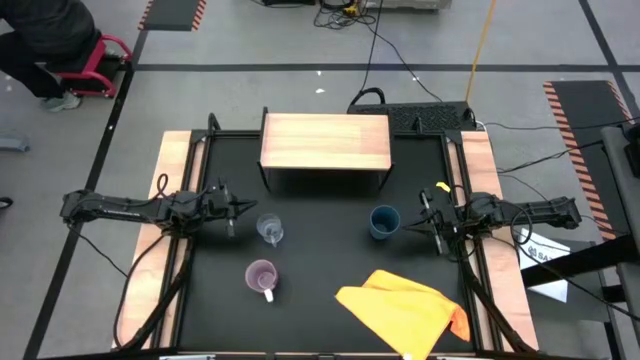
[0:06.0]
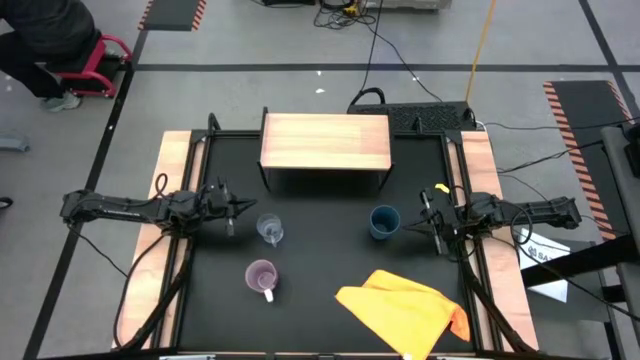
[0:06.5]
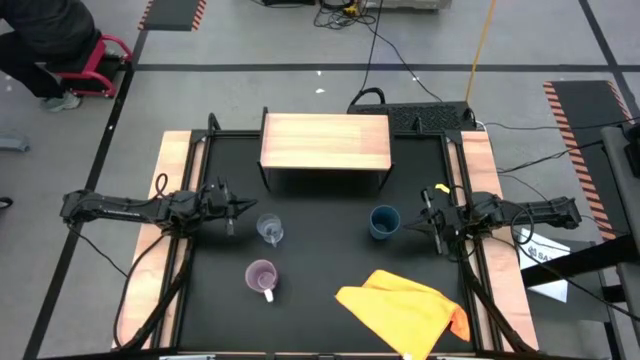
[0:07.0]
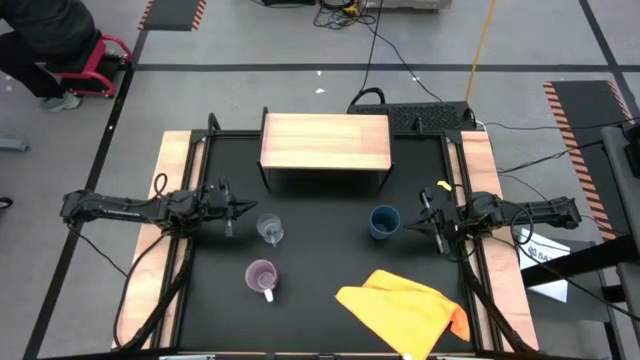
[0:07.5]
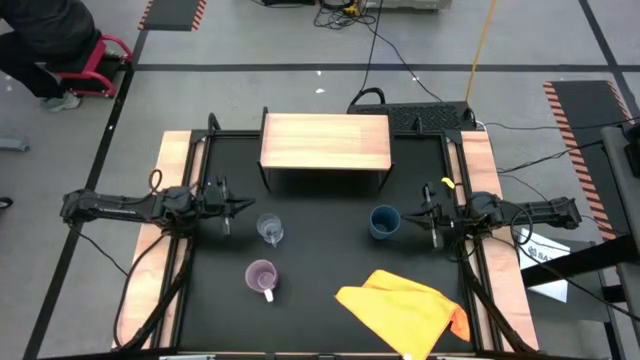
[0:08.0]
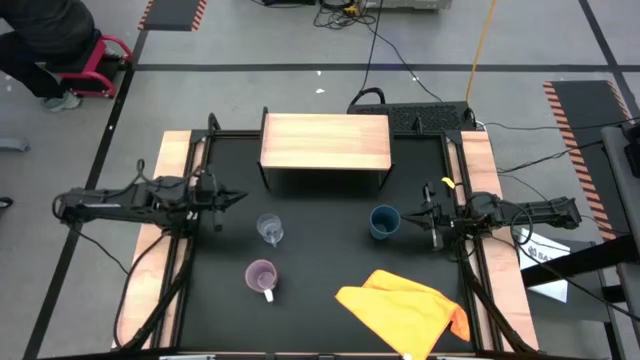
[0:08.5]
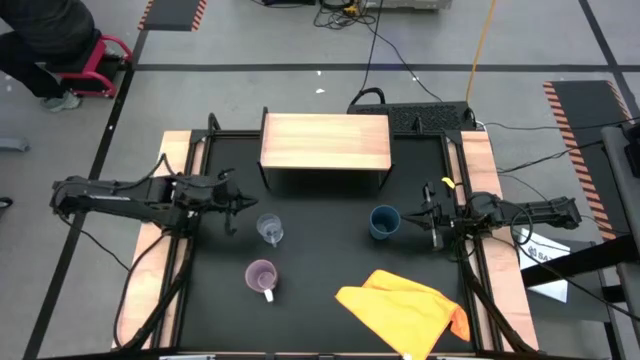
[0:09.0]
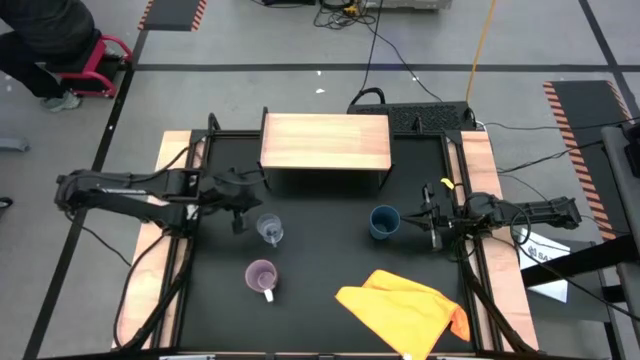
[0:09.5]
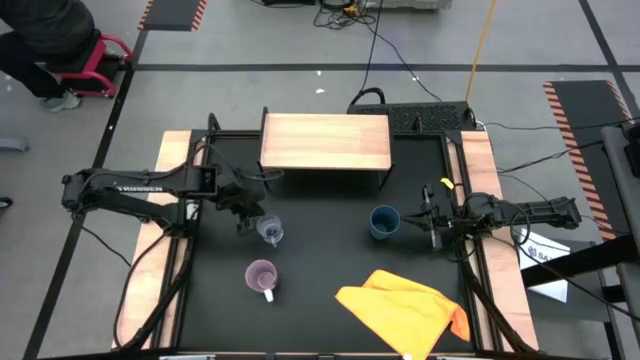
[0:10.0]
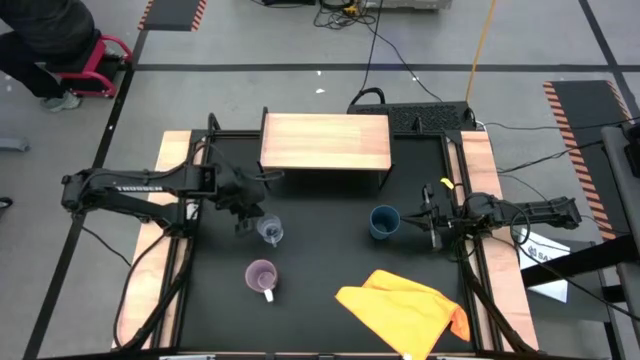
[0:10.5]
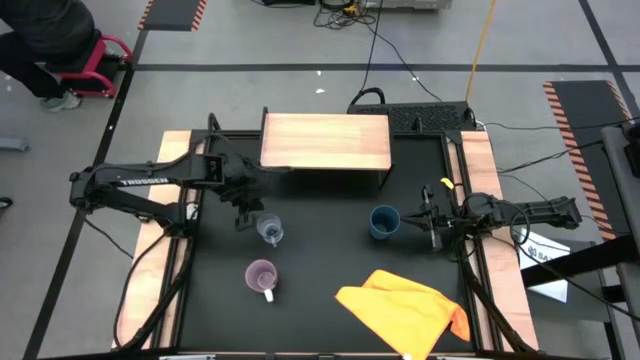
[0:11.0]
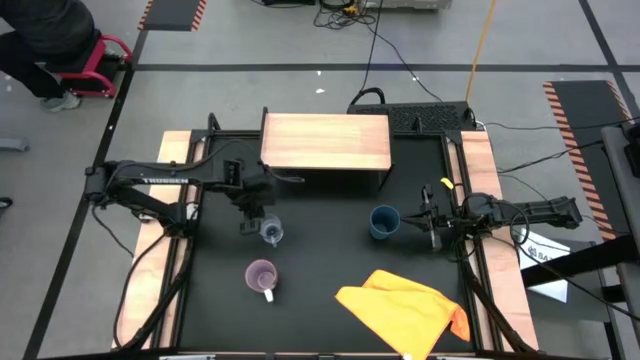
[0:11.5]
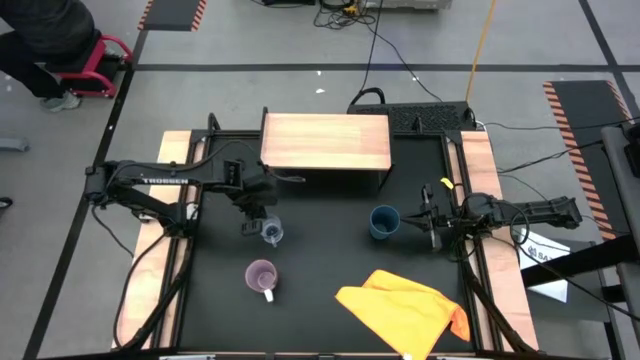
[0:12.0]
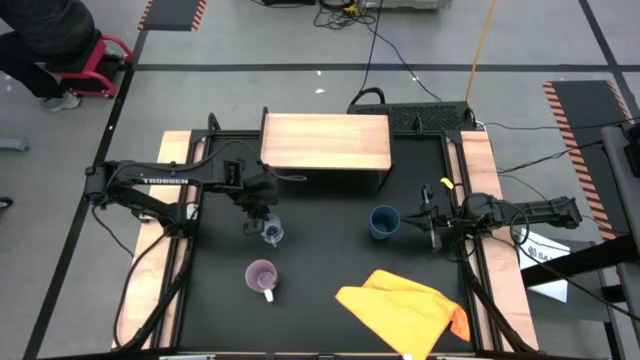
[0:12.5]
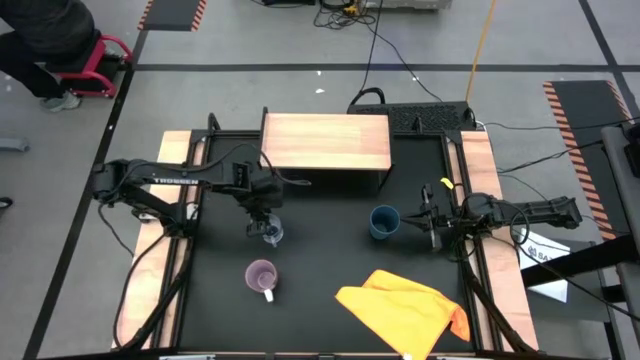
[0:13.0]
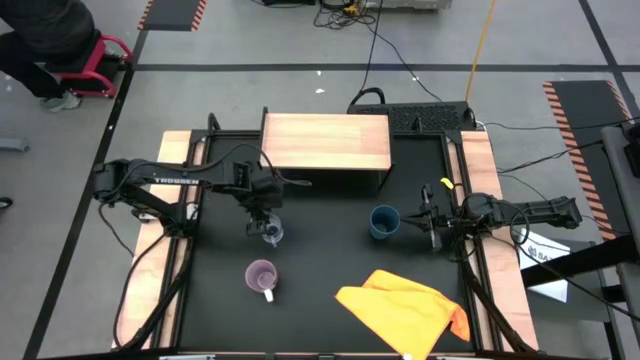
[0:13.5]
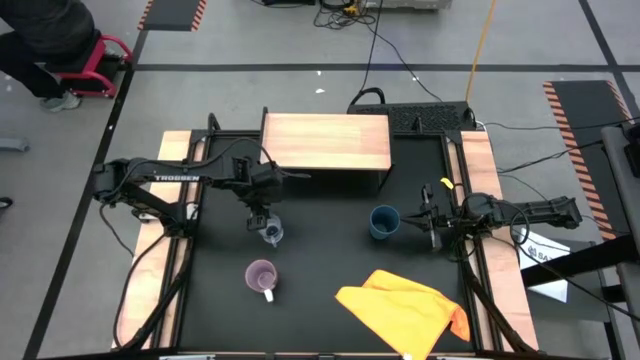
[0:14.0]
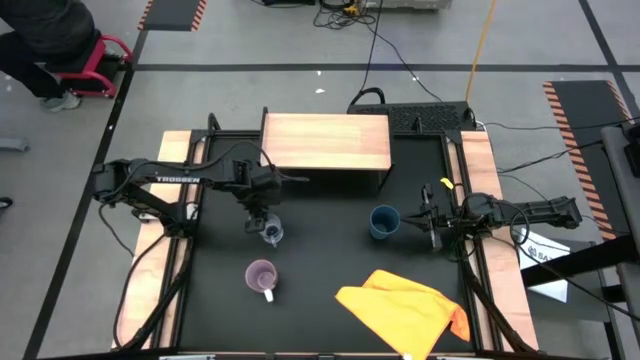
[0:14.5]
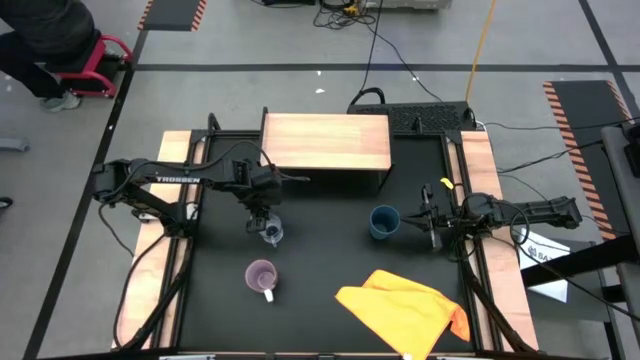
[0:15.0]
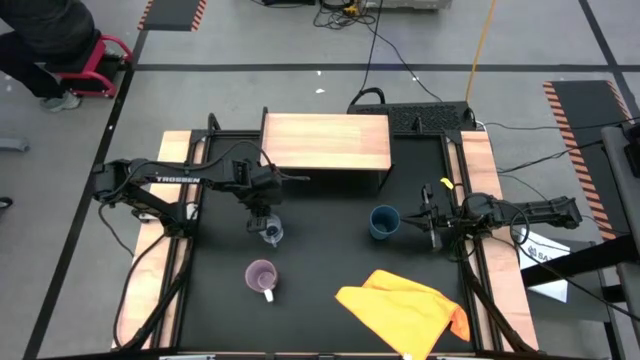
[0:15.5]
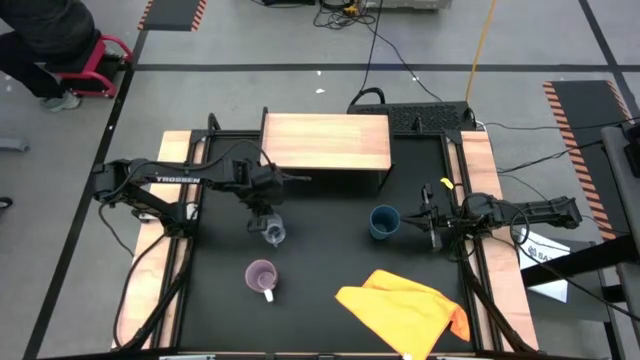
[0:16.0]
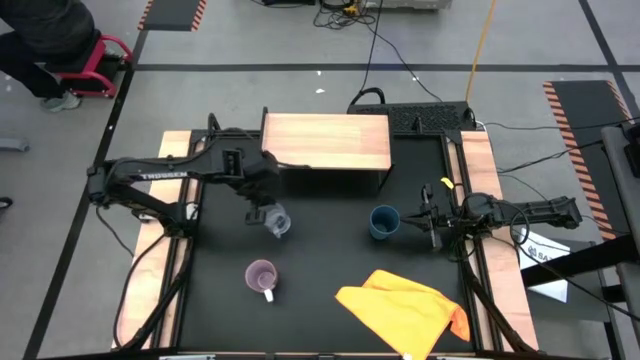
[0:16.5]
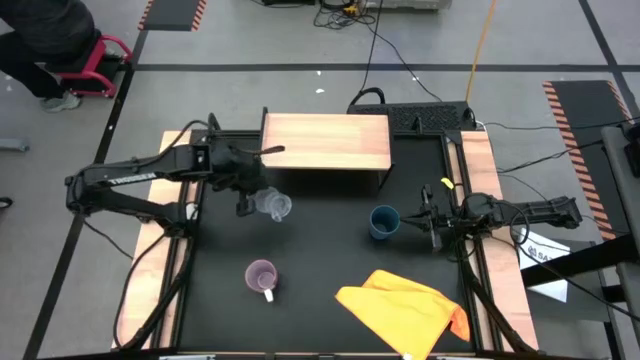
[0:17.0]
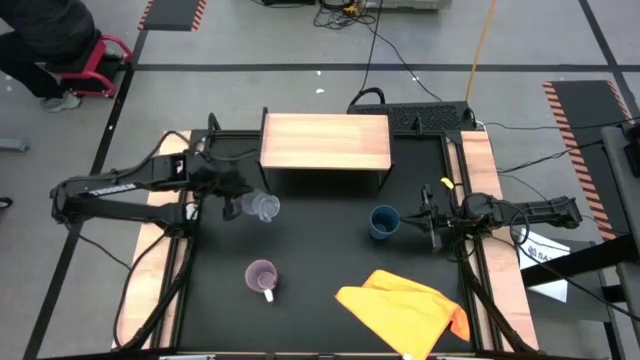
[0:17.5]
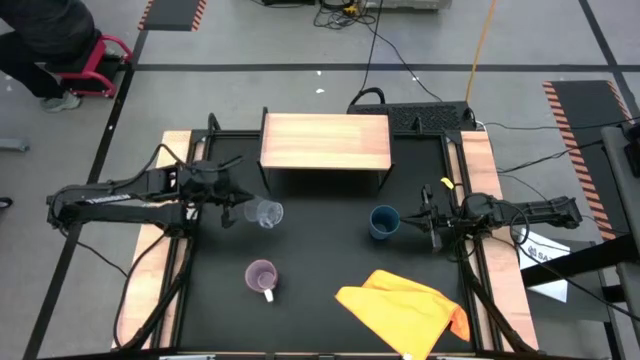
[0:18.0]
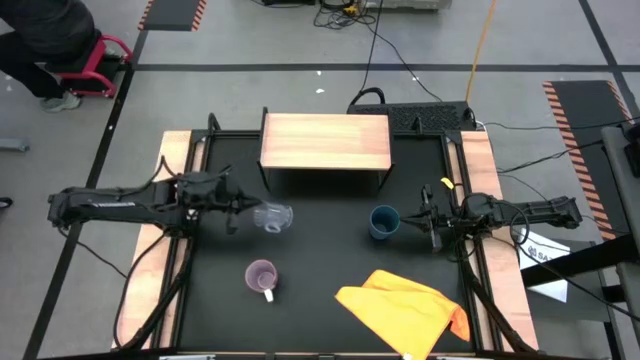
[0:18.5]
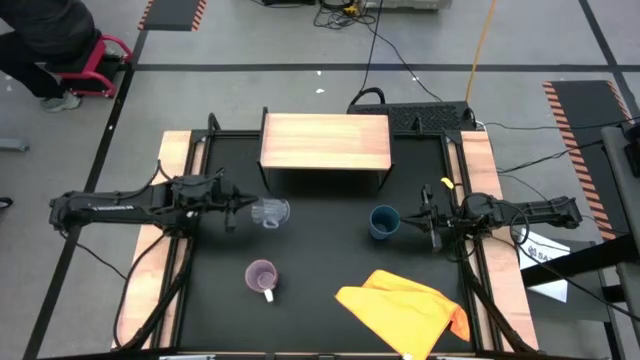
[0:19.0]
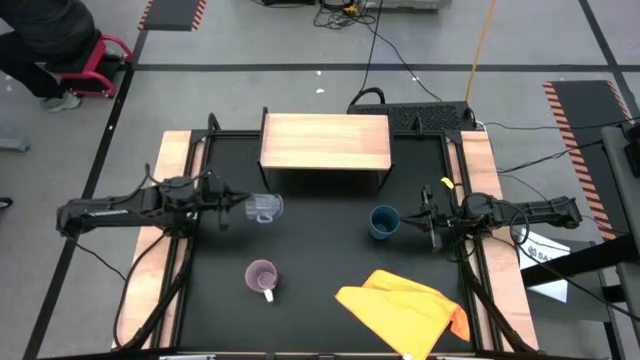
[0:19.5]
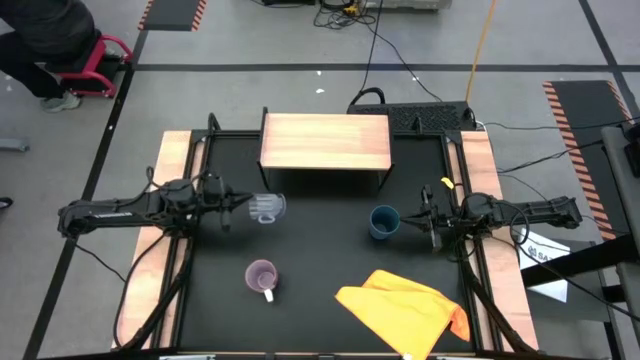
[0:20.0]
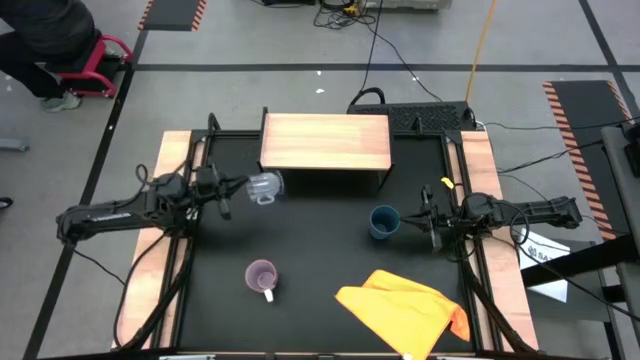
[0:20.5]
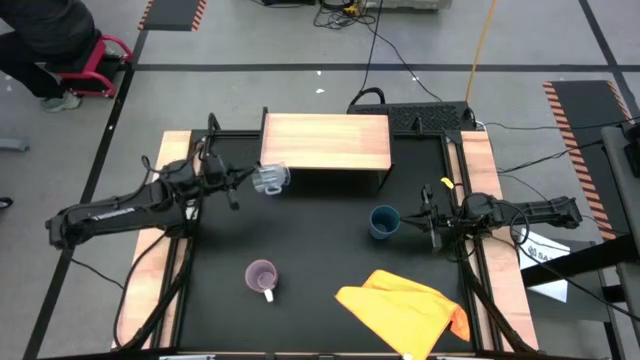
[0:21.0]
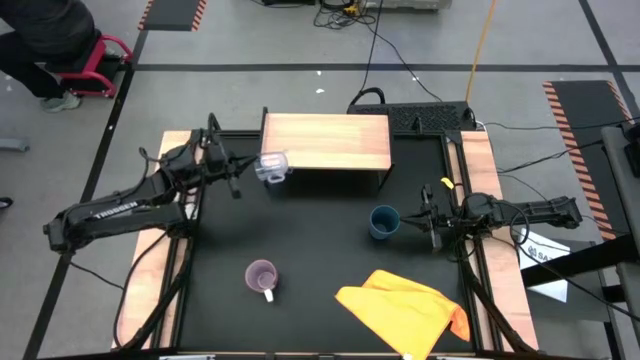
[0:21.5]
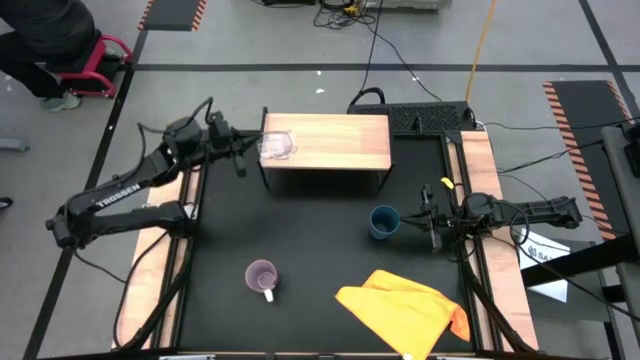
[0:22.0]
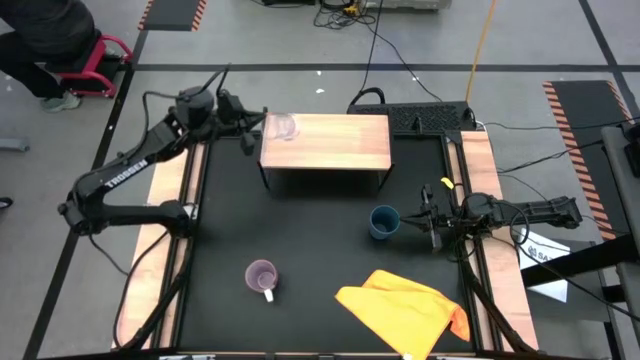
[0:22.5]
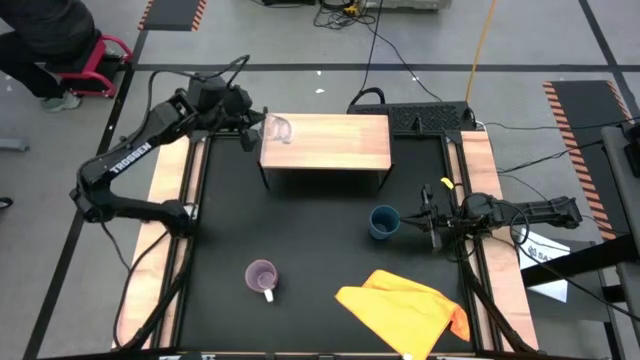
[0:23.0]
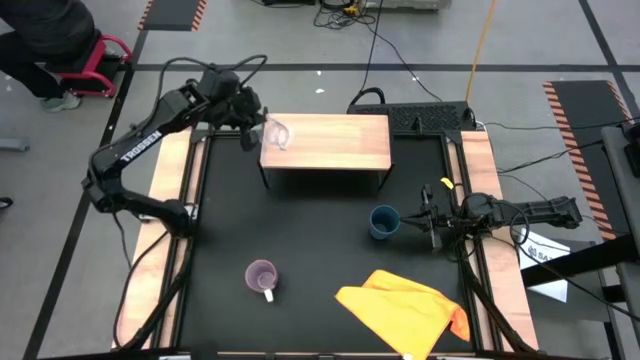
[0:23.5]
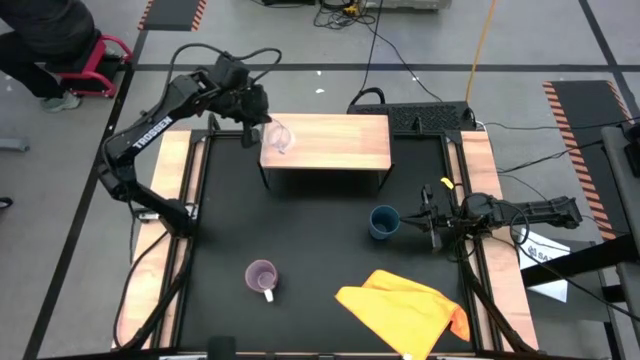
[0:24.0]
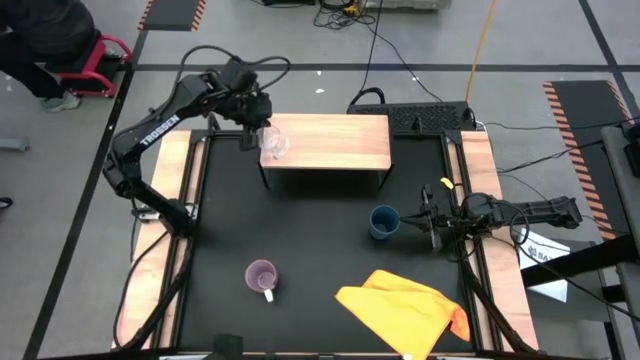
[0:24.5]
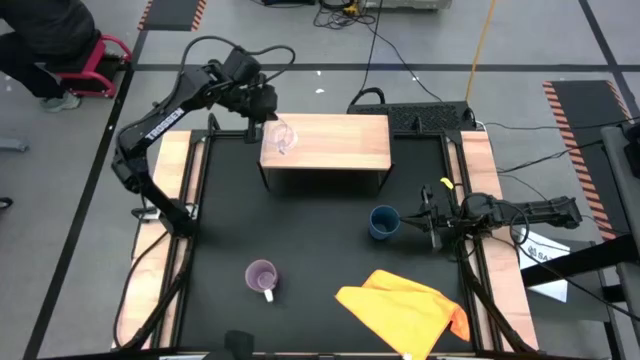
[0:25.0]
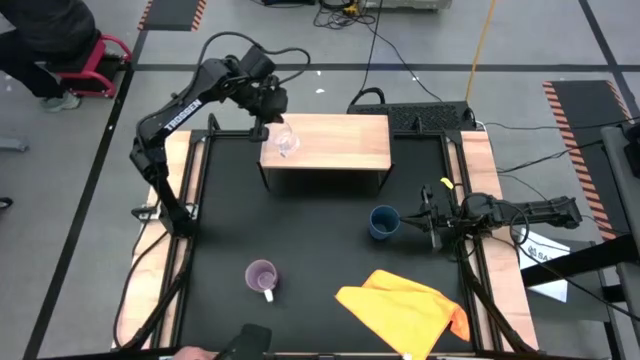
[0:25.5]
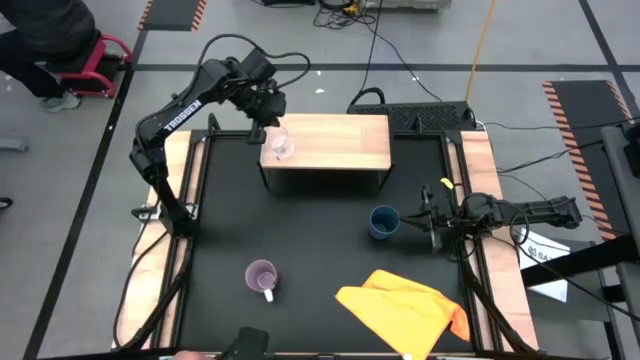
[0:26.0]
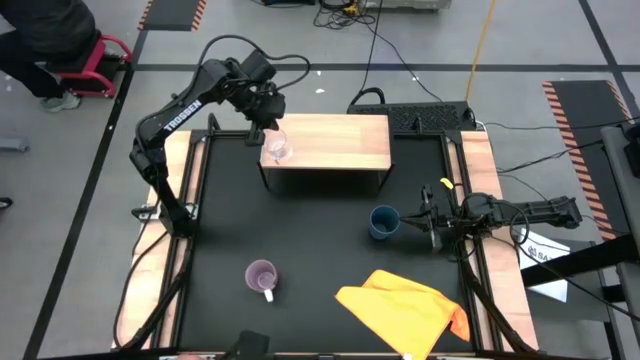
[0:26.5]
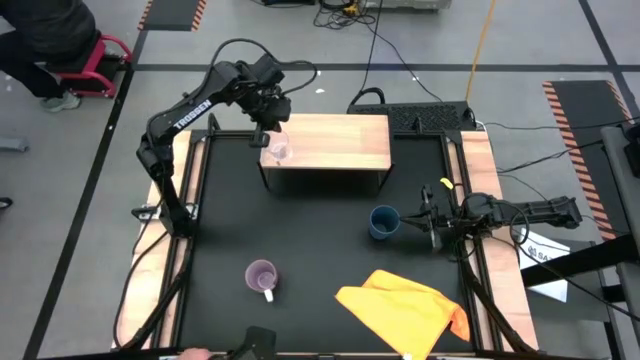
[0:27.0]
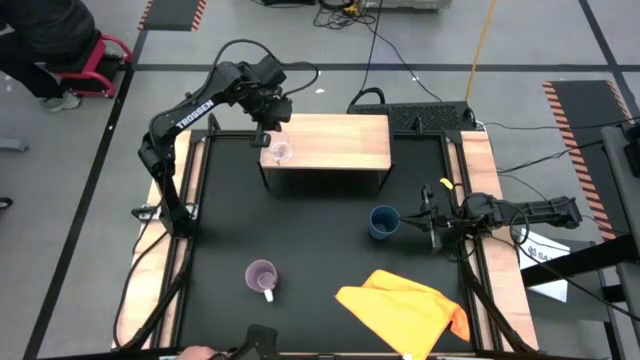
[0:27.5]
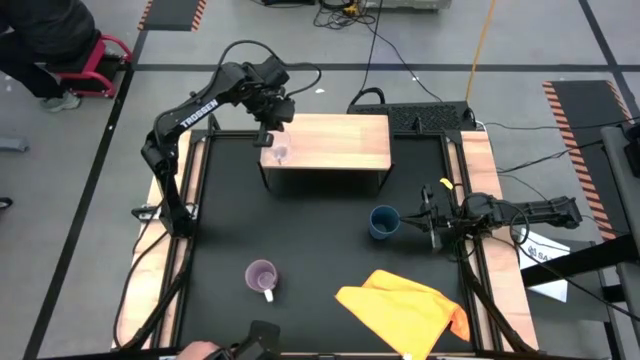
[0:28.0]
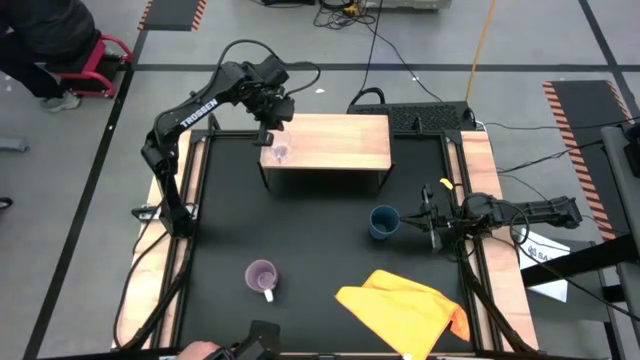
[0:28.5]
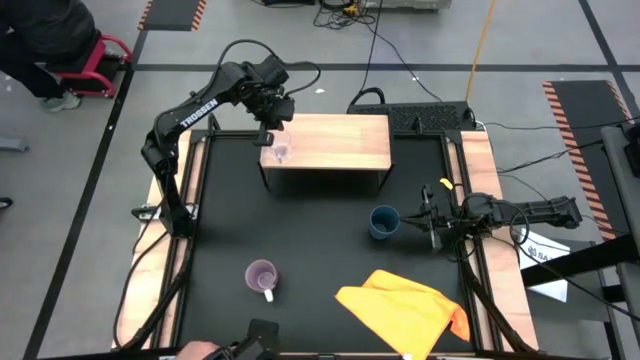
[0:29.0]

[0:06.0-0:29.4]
Task: Stack small to large cups/mugs on shelf
Put the transparent mug on the shelf
